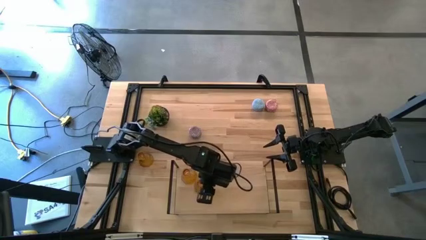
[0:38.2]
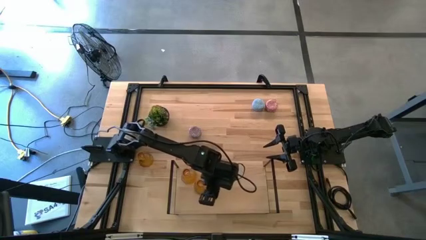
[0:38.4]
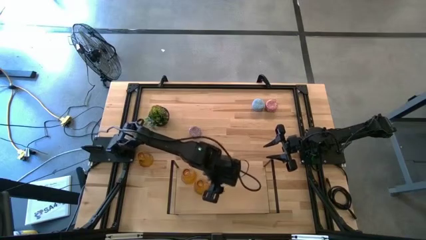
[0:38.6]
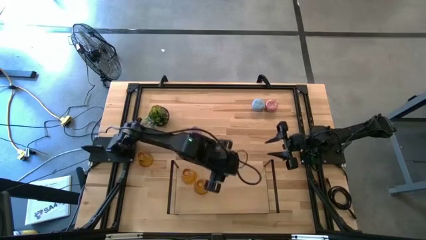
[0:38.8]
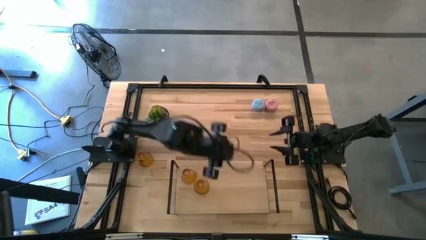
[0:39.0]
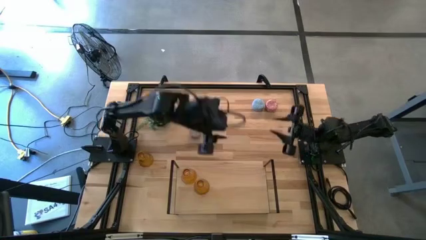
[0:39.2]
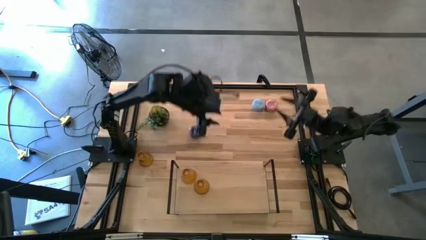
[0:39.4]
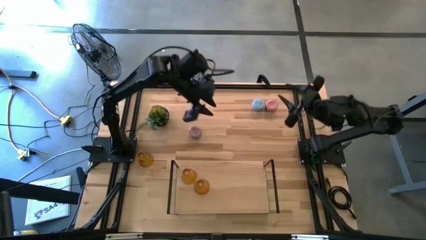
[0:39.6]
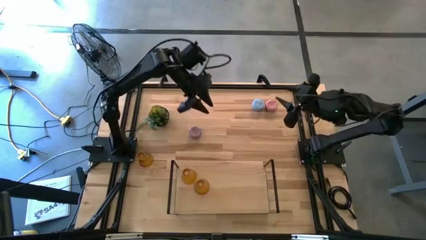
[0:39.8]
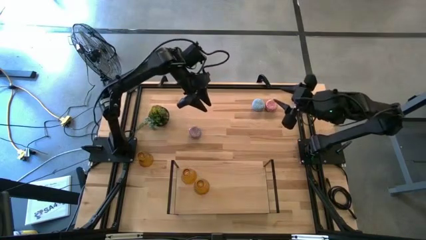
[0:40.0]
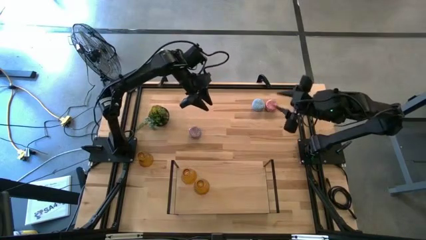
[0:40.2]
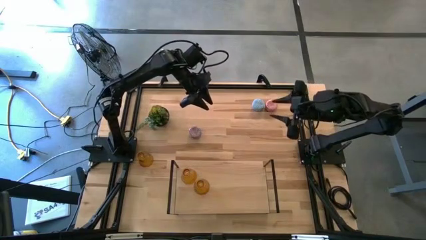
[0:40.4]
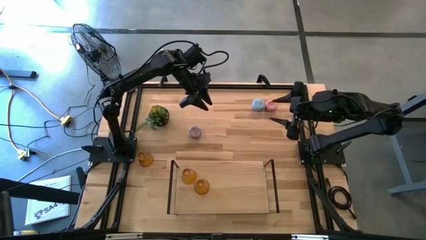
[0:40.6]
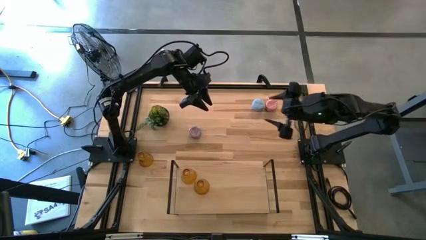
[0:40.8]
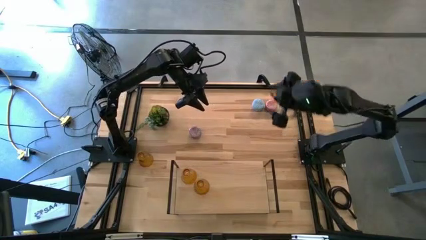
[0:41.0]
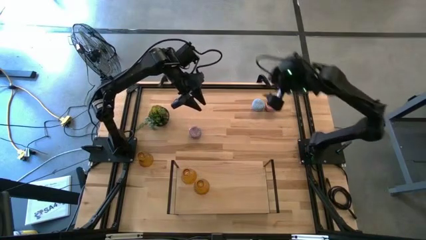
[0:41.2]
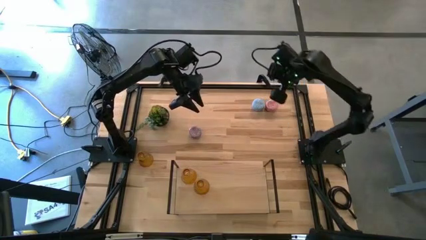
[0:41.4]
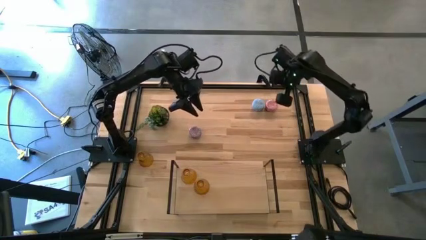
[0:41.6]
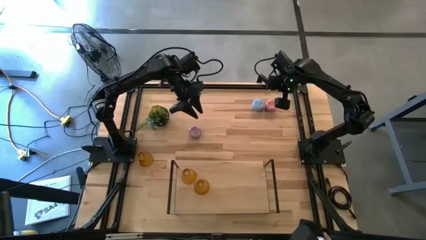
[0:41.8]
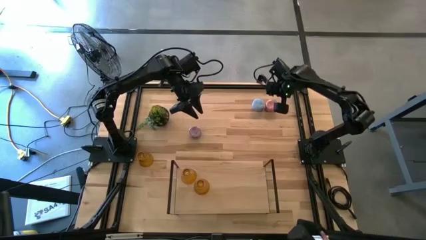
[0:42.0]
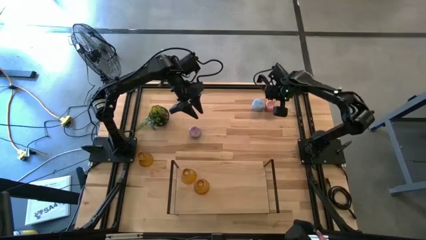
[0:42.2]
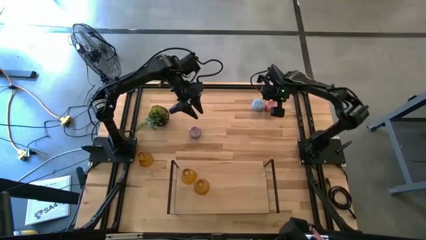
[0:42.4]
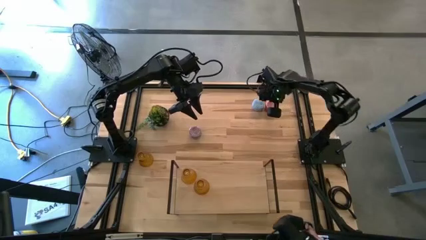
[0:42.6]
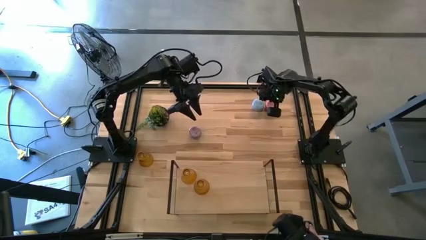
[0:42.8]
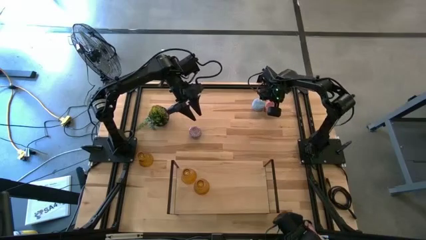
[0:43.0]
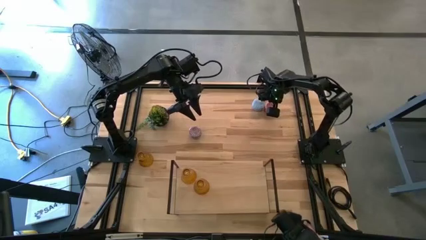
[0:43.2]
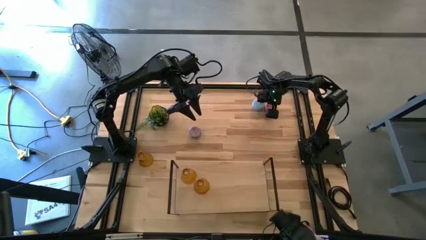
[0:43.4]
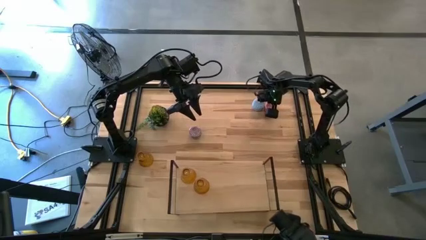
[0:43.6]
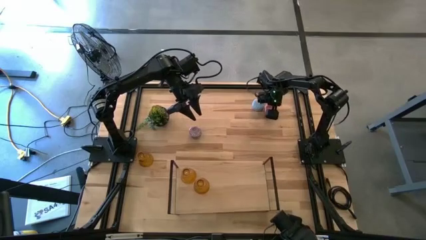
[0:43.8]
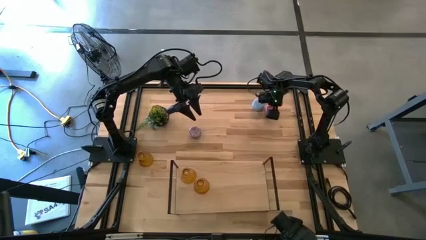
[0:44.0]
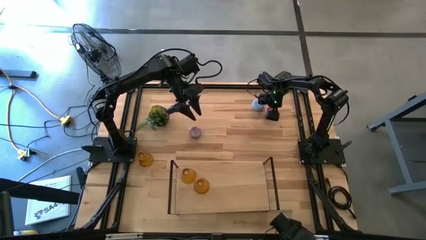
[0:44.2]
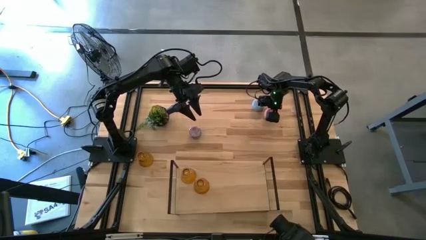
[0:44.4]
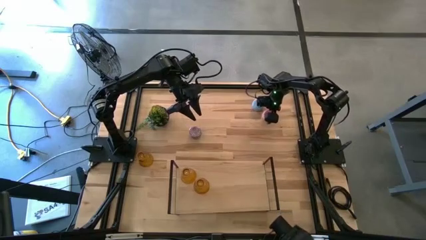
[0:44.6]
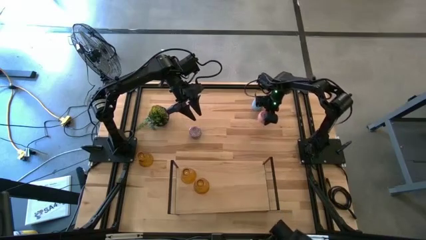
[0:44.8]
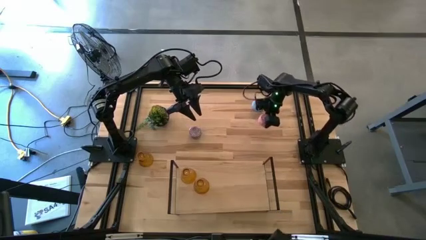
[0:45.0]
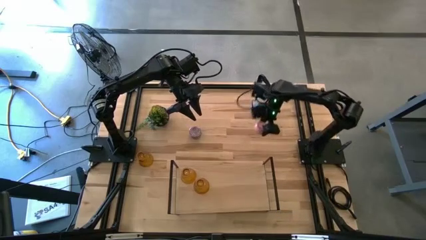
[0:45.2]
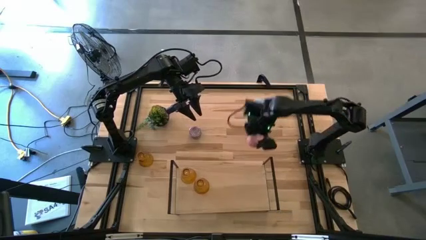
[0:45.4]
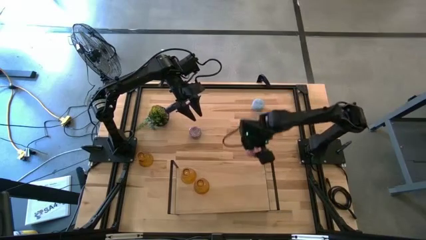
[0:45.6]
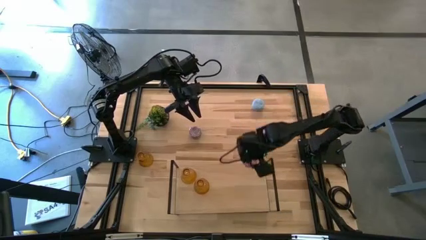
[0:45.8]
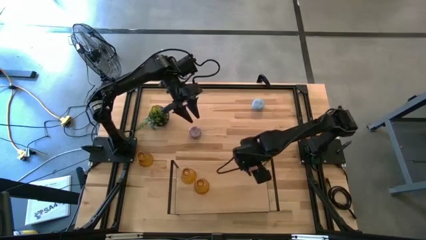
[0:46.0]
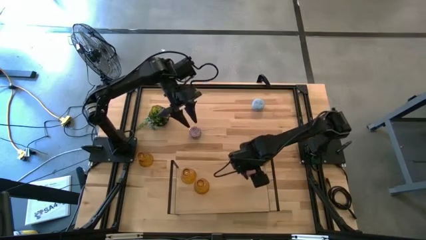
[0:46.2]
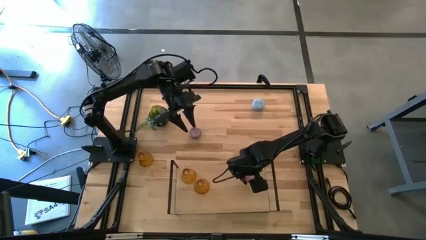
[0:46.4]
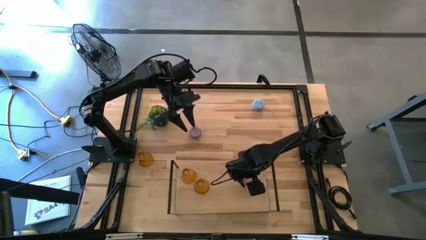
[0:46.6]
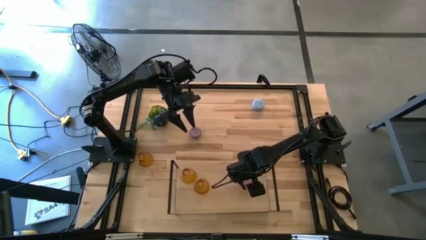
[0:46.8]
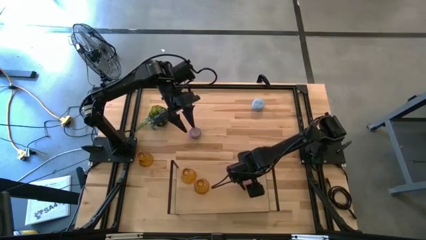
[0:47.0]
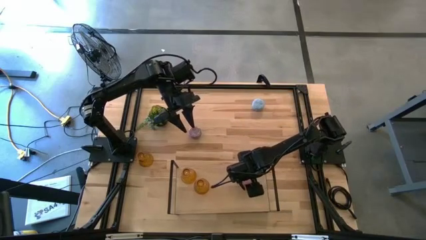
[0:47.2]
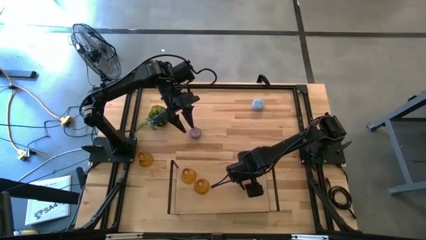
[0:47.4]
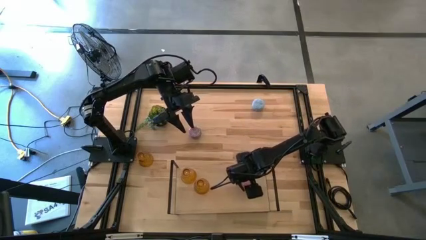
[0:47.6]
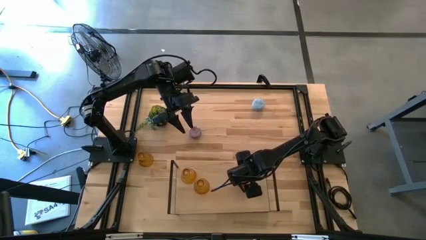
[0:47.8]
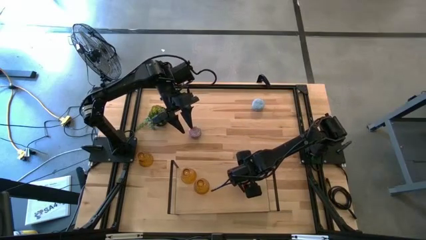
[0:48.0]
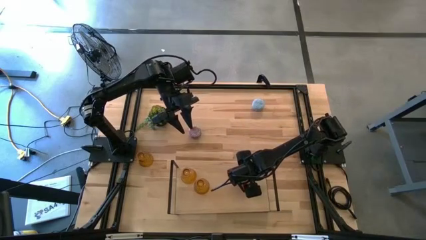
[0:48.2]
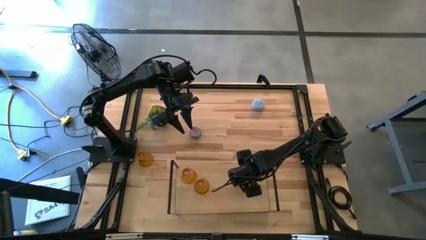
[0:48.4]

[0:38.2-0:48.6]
Task: Pick & Place candle stick holders
Put the pink scented candle on the shelf

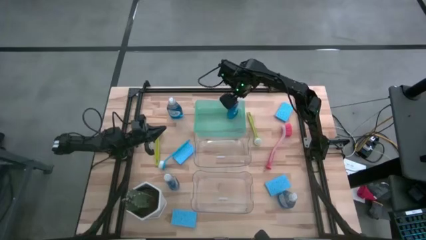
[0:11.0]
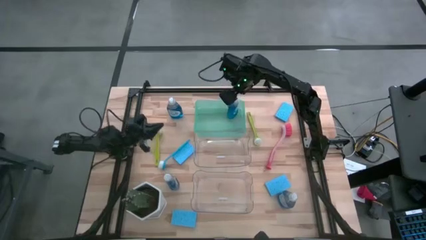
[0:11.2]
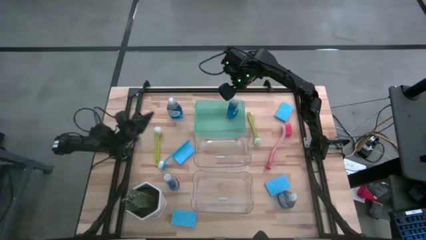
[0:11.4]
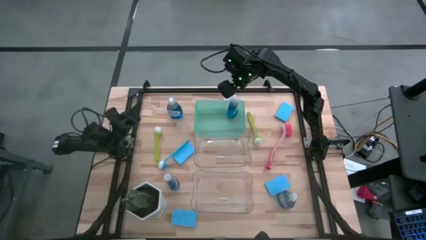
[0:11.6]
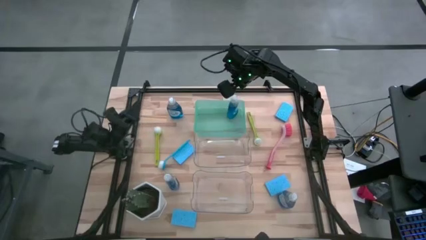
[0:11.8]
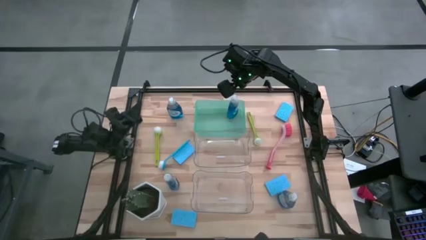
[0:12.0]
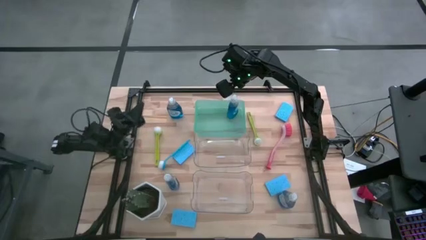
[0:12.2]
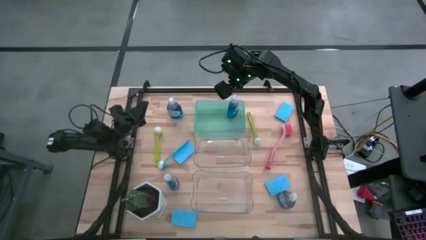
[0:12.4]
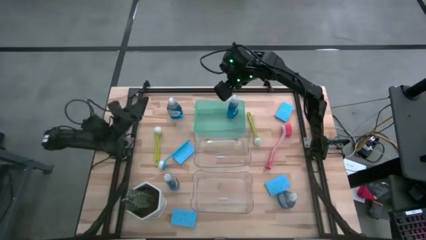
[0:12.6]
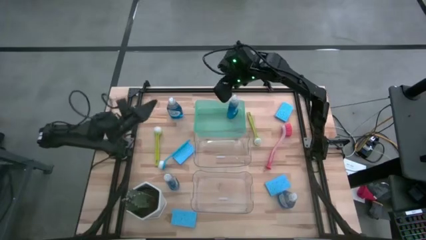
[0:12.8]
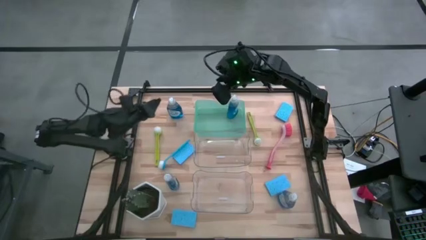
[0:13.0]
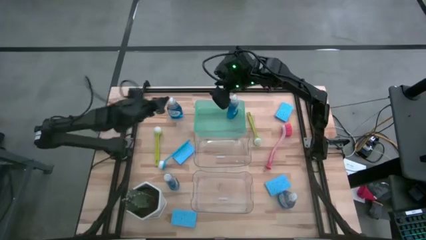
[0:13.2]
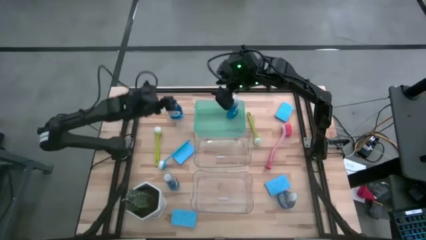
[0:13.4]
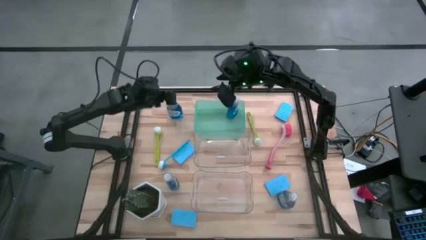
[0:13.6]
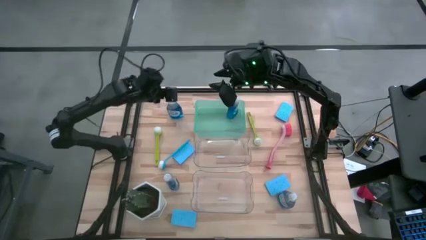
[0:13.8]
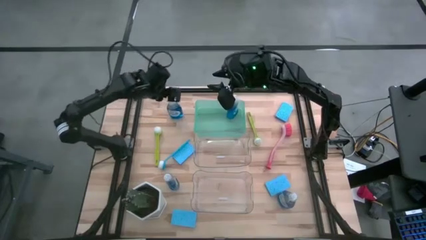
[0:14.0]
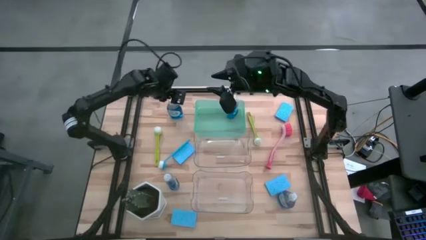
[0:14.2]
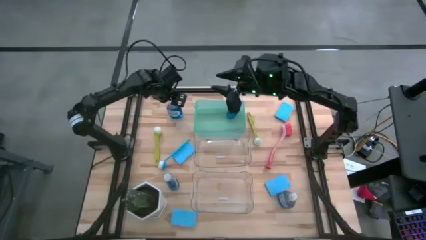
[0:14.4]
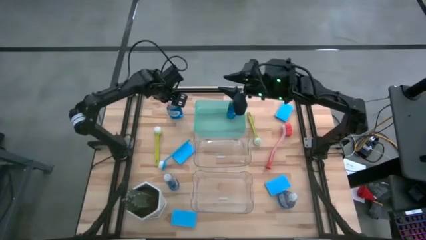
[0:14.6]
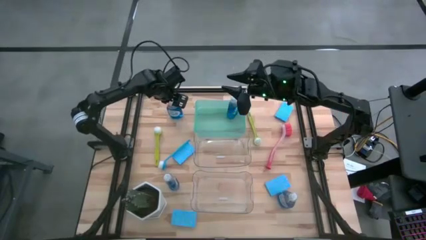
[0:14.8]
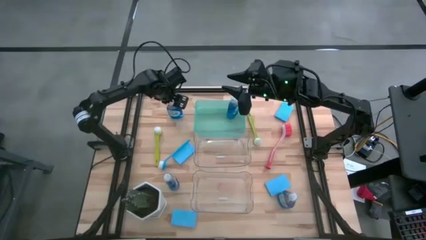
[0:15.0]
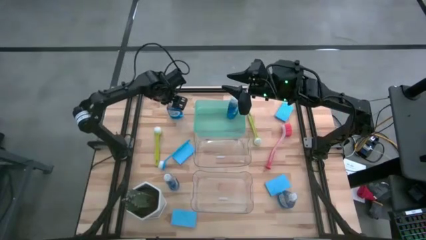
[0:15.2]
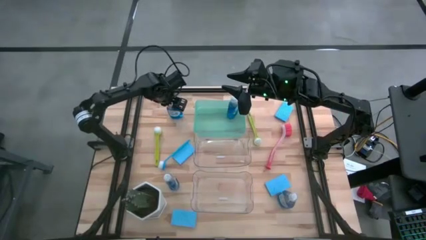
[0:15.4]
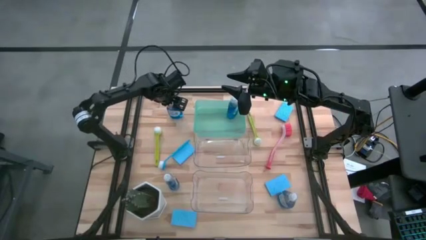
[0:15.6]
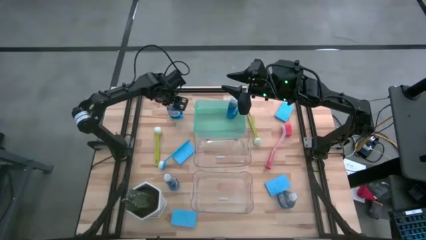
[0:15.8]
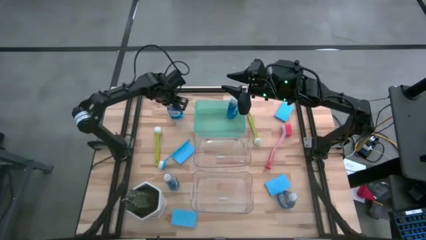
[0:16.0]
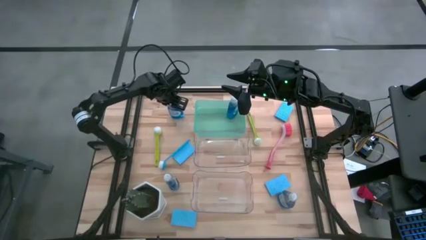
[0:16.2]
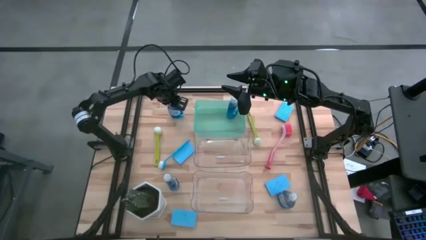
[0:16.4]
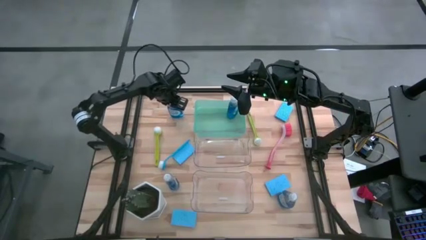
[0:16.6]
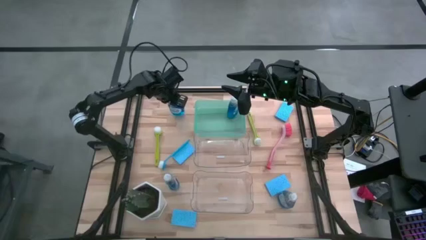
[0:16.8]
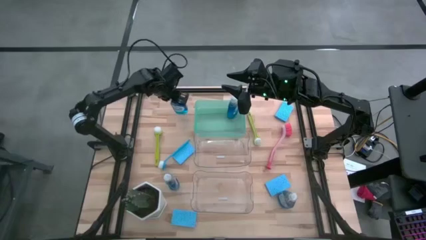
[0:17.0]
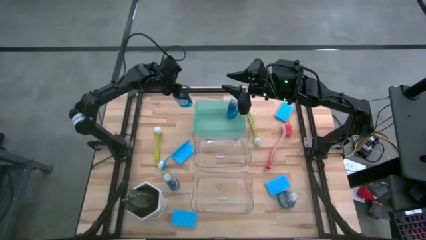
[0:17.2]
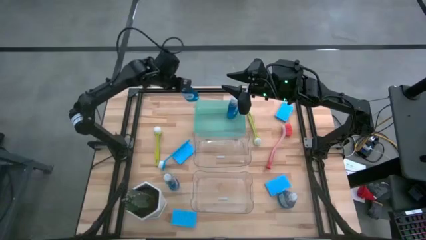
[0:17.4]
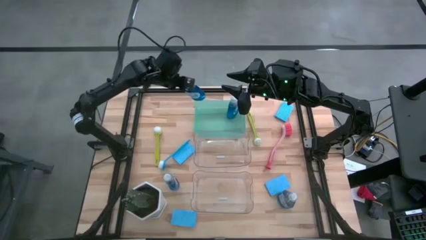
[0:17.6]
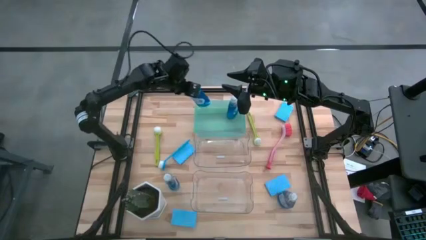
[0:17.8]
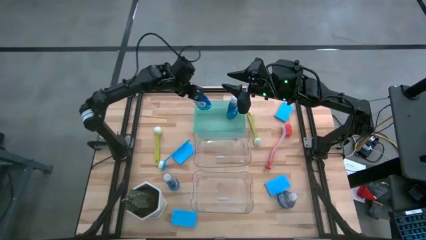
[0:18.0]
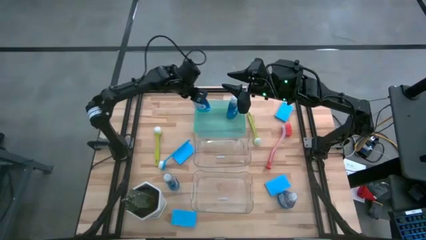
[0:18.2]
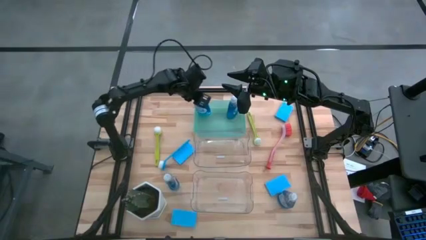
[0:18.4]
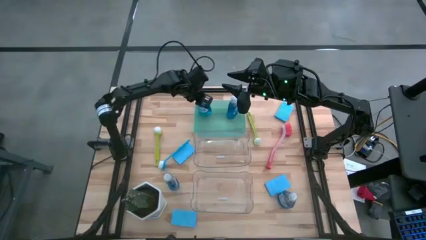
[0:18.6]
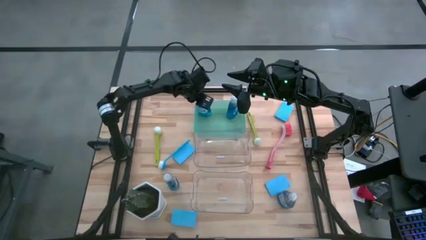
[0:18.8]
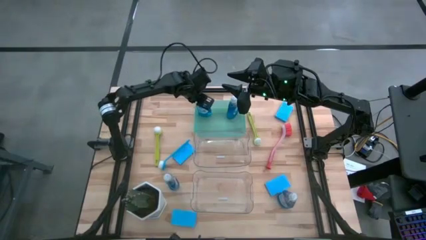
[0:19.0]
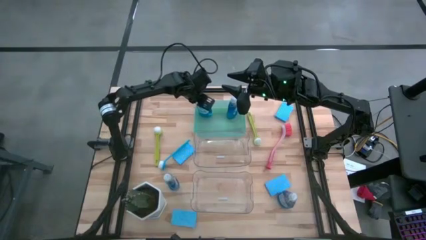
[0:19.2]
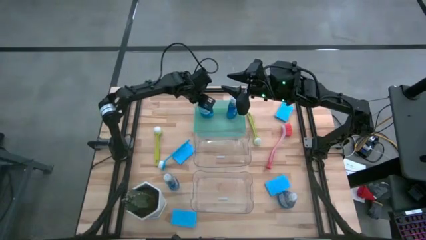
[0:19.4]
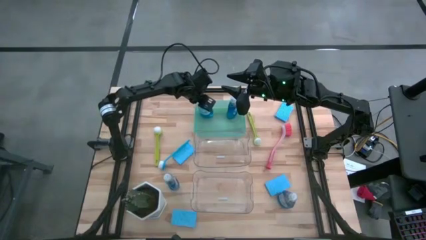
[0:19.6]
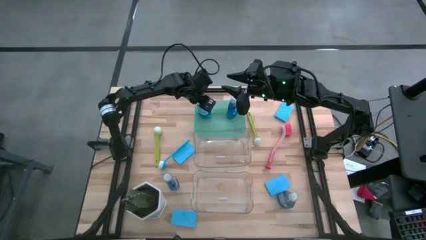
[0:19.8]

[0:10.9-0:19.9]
Task: Pick & Place Kitchen Sink Supplies
Put the dishwashing liquid into the green bin
